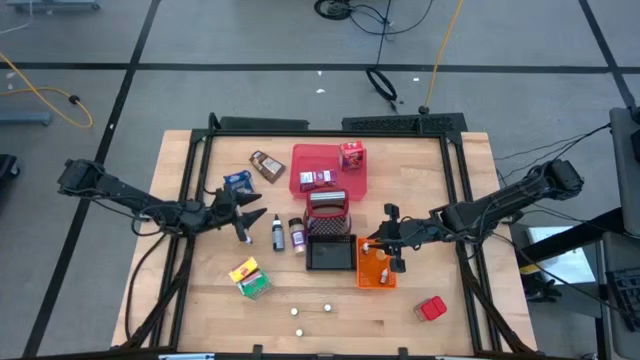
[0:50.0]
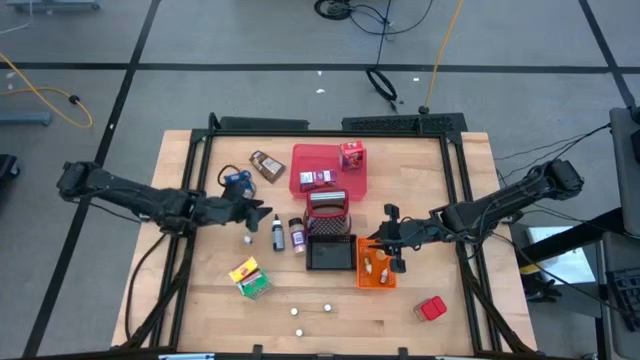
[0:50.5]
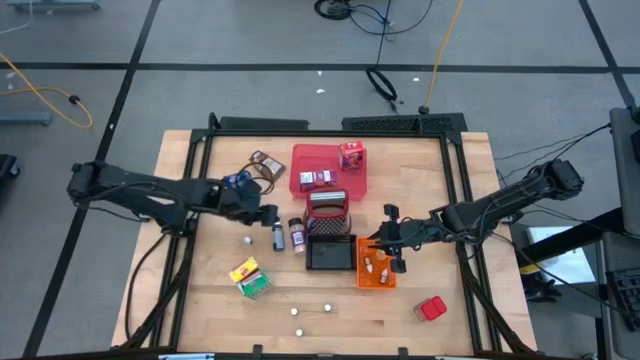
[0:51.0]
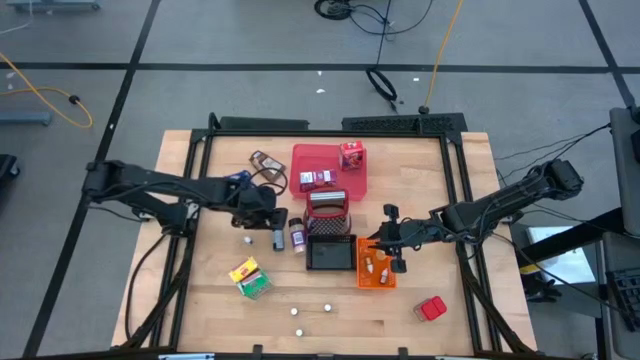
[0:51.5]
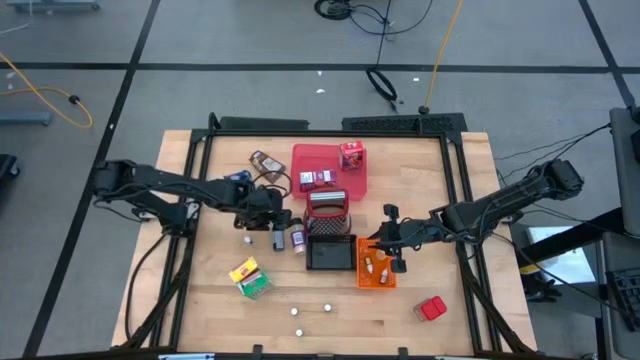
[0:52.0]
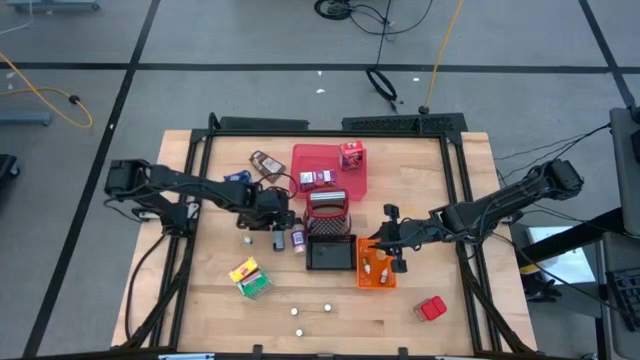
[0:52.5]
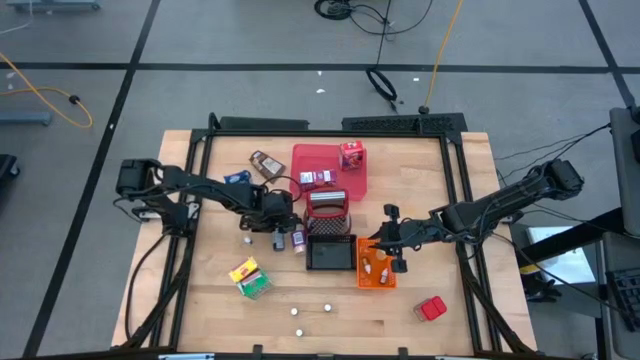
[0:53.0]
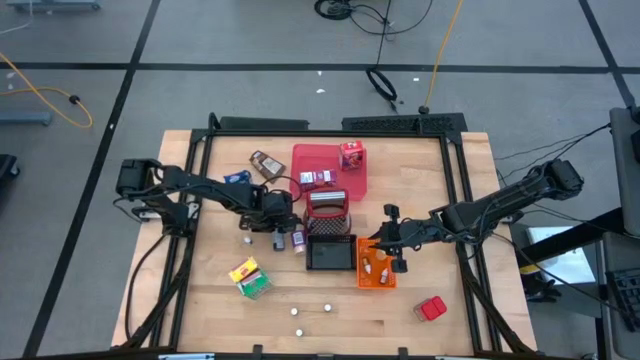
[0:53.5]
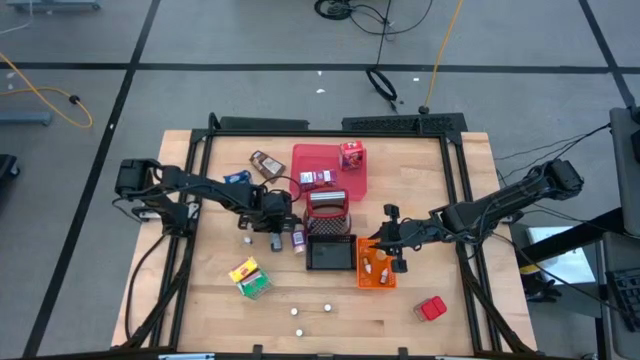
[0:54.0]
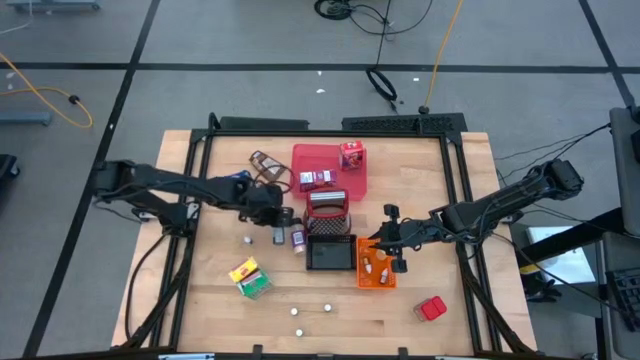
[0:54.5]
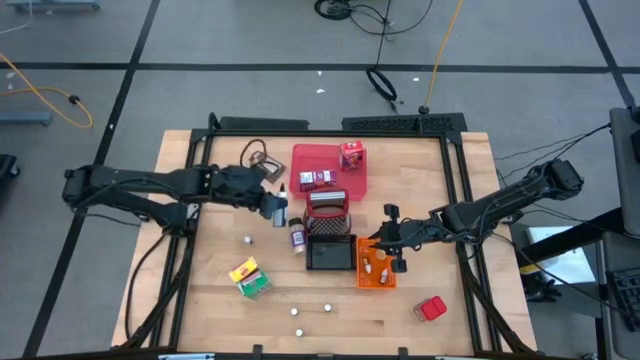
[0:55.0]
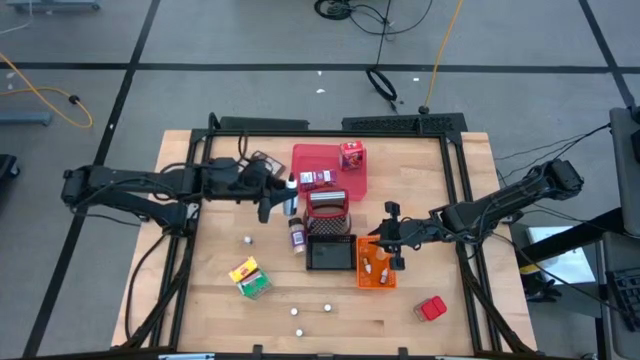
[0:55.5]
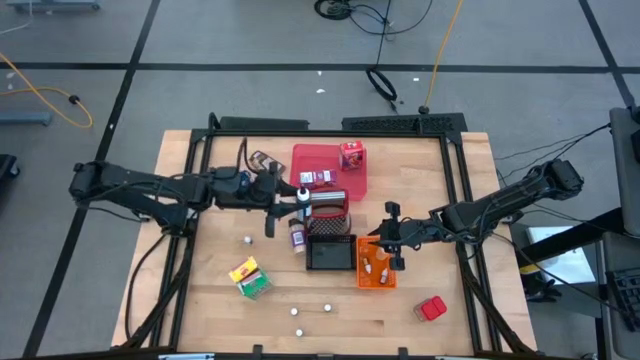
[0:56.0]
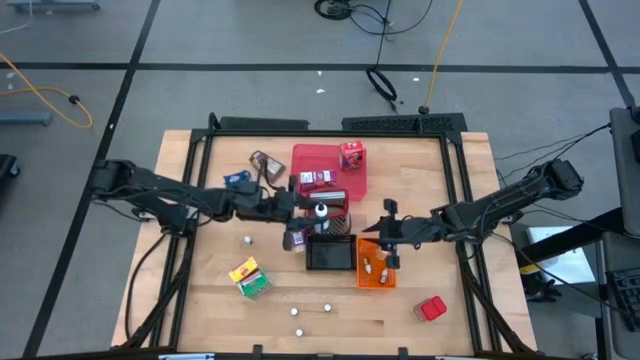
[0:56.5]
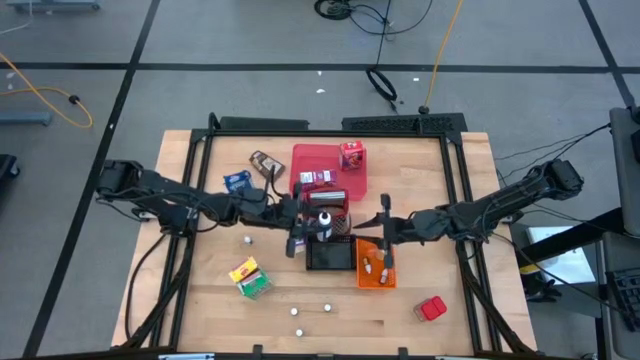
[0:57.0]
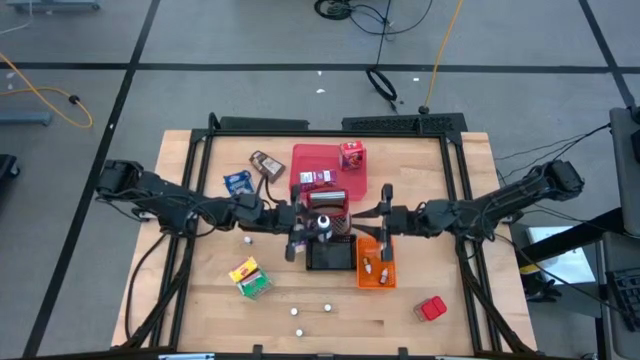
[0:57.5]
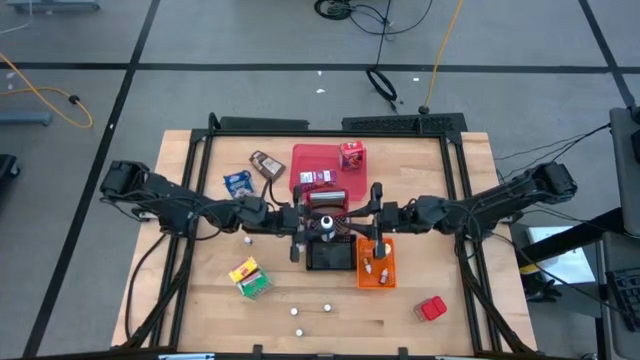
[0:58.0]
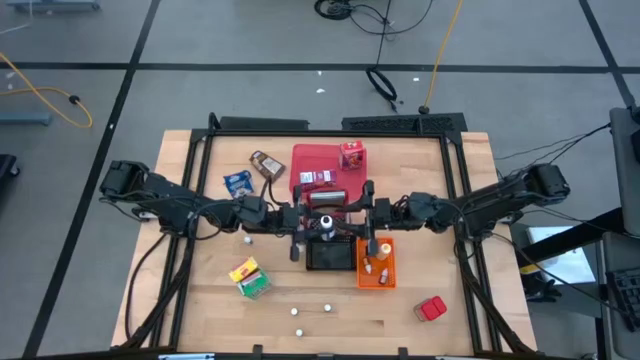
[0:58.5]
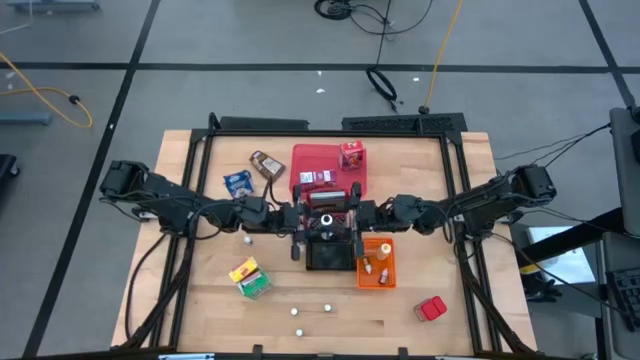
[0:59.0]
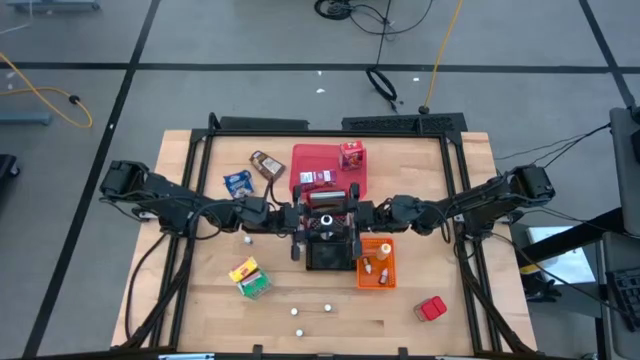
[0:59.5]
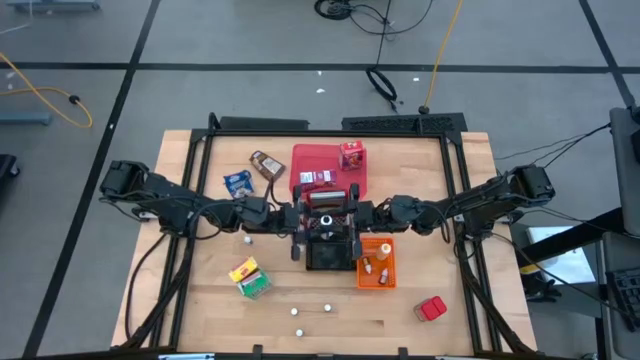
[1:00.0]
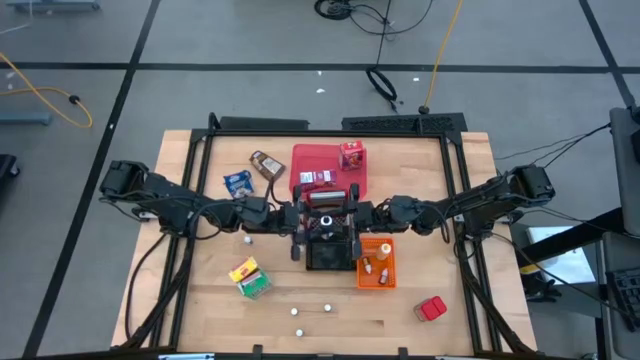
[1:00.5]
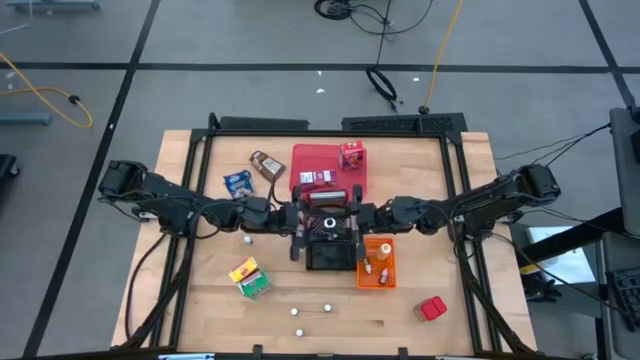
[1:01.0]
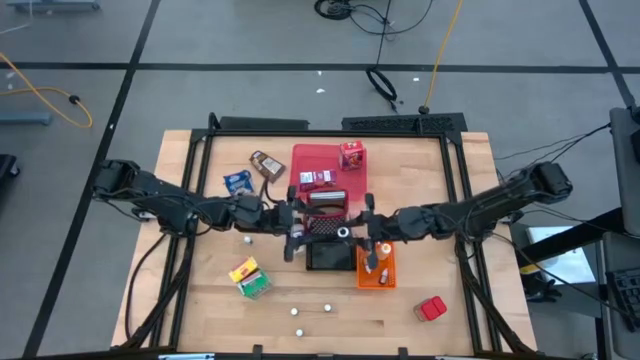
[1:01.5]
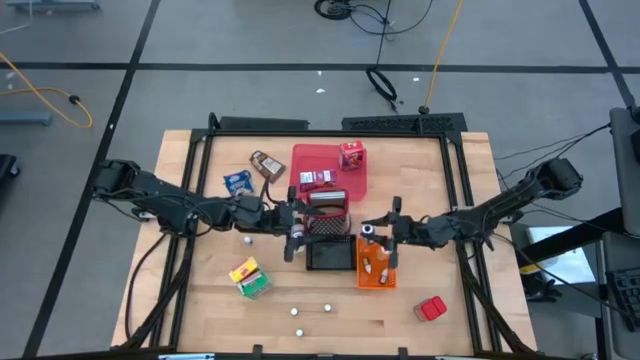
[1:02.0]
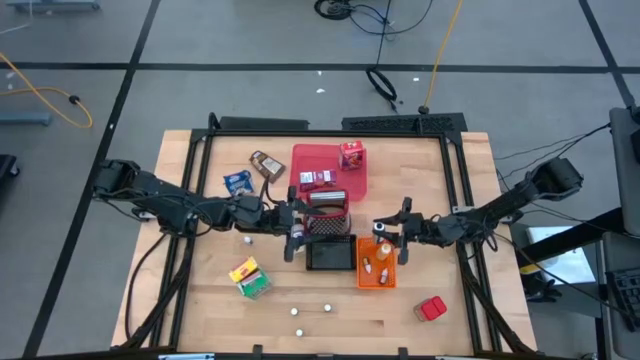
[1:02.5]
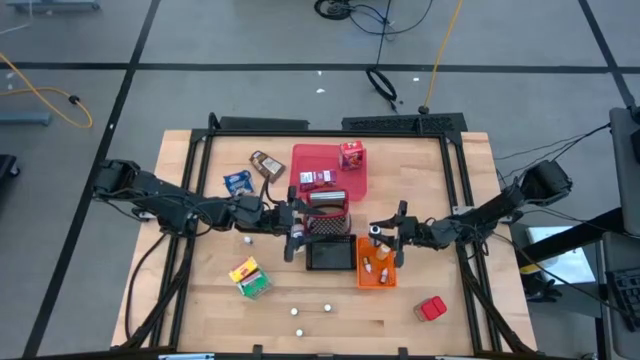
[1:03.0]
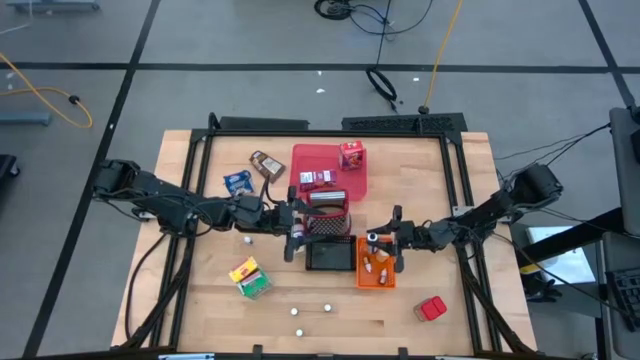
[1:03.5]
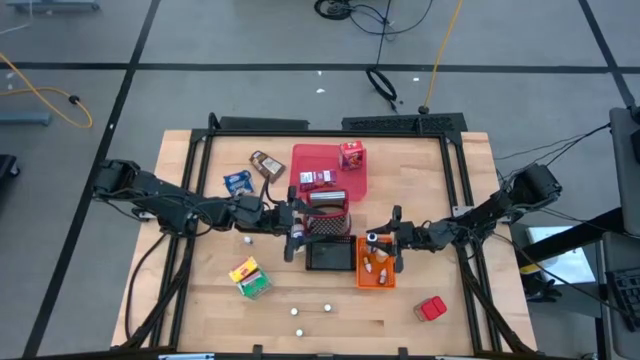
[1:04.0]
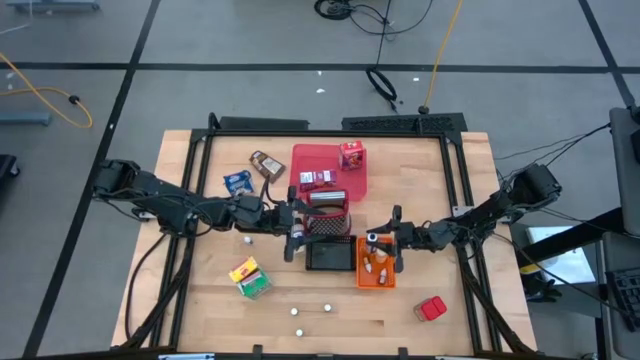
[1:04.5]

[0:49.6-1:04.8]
Task: Pick & Place Kitchen Items
Put the big black food coloring bottle into the orange bin

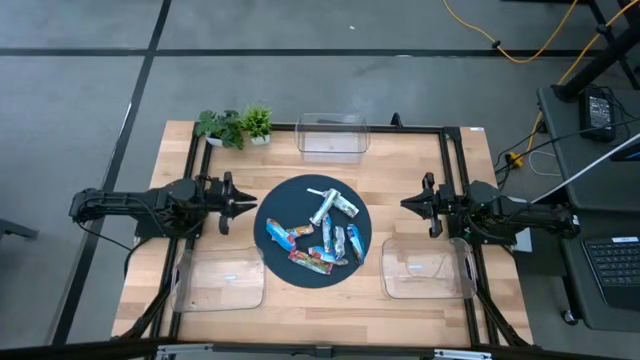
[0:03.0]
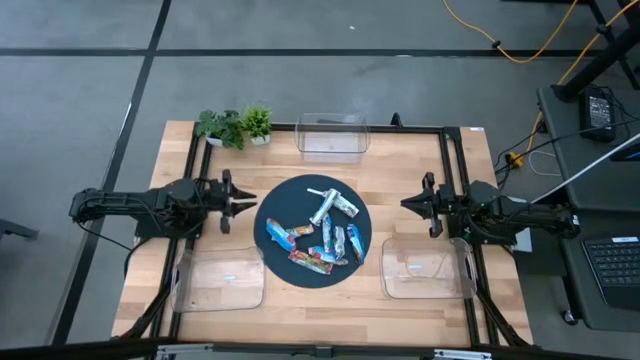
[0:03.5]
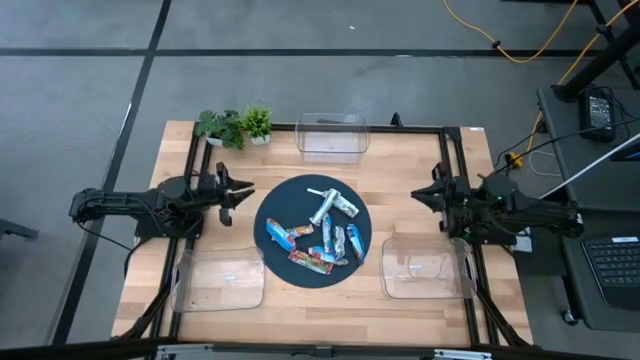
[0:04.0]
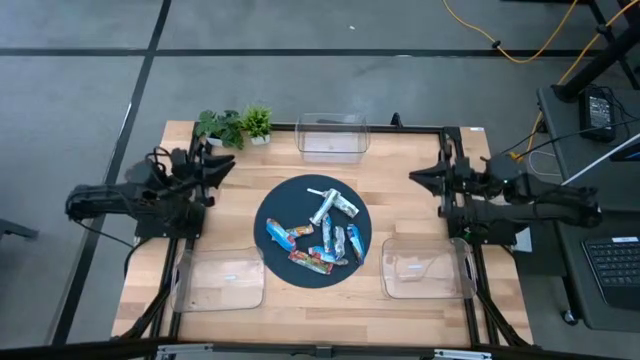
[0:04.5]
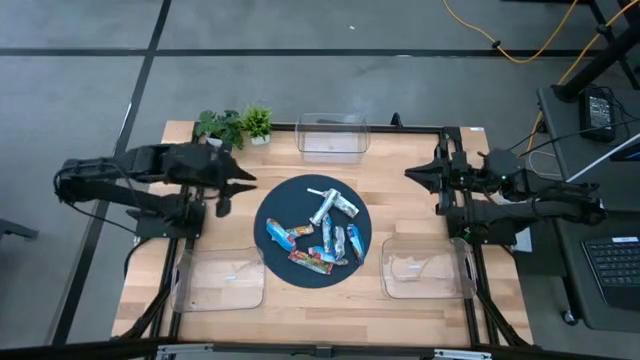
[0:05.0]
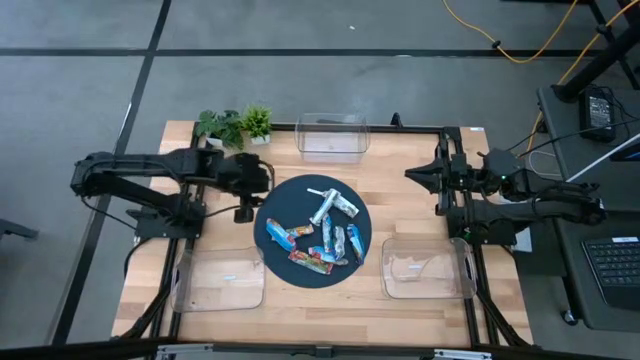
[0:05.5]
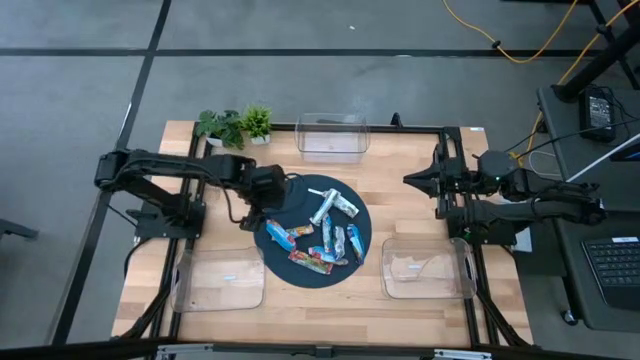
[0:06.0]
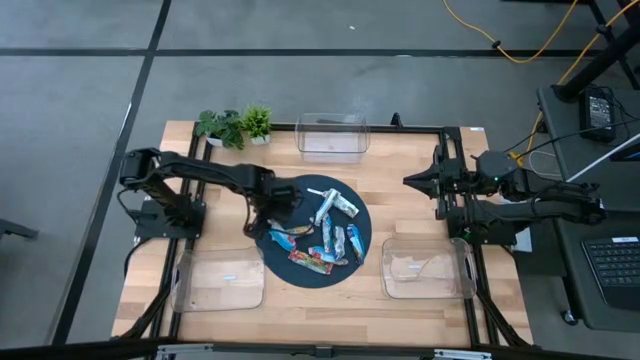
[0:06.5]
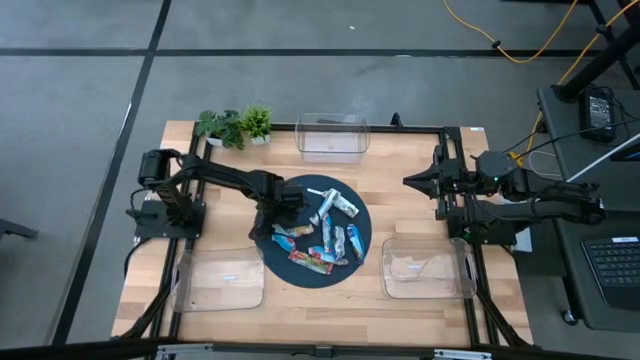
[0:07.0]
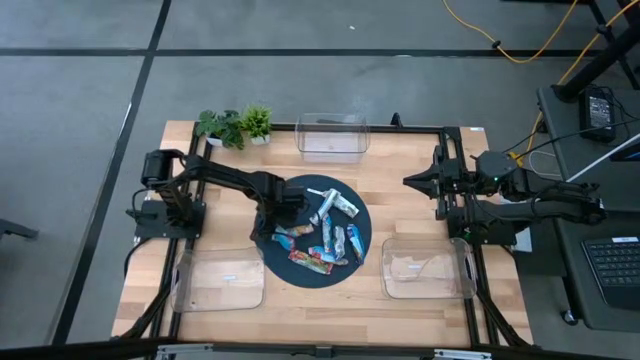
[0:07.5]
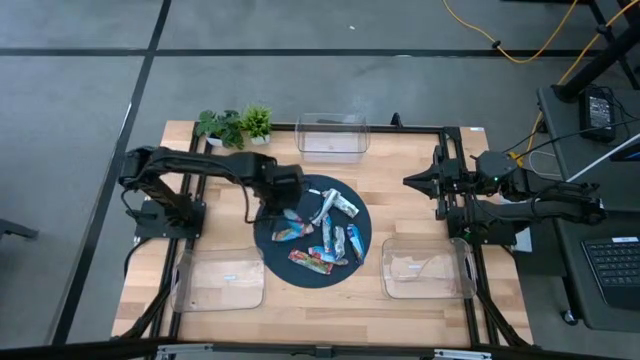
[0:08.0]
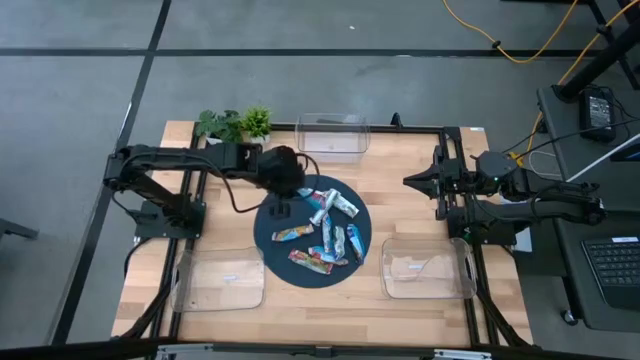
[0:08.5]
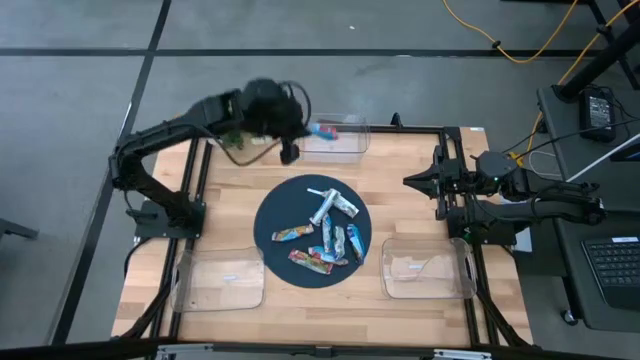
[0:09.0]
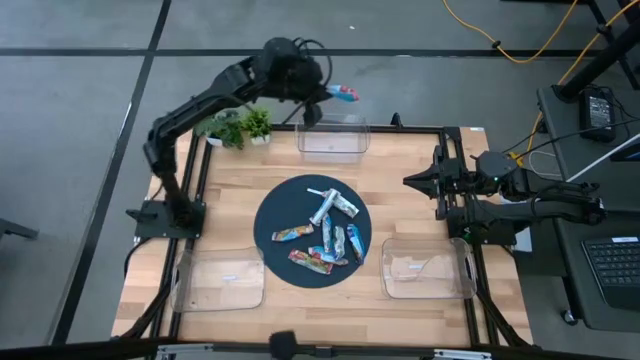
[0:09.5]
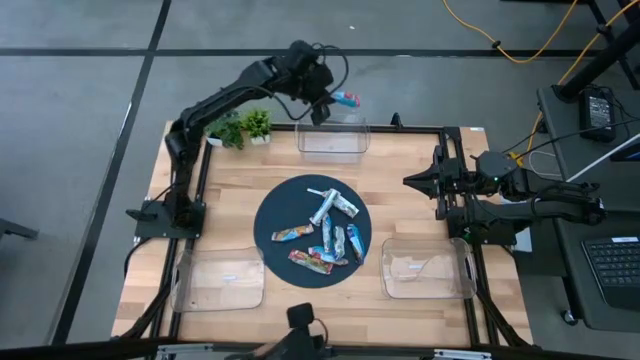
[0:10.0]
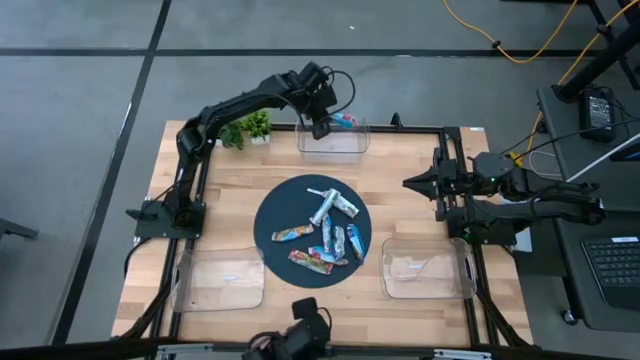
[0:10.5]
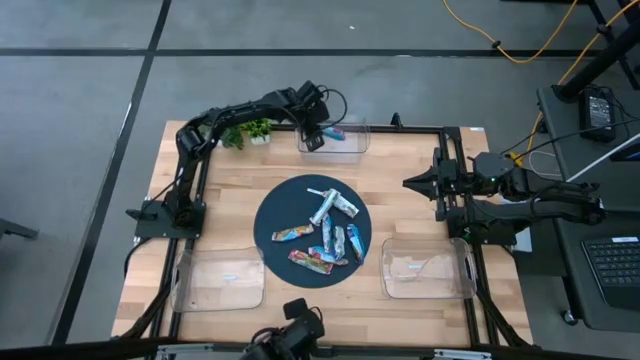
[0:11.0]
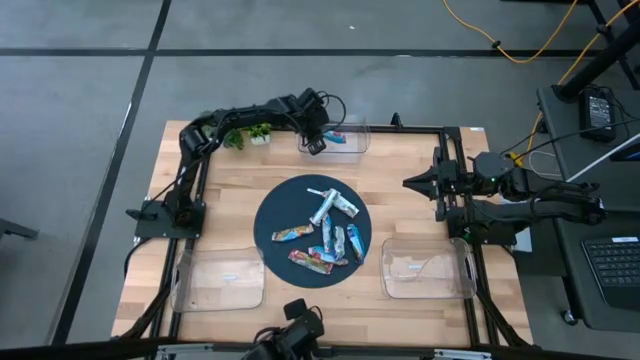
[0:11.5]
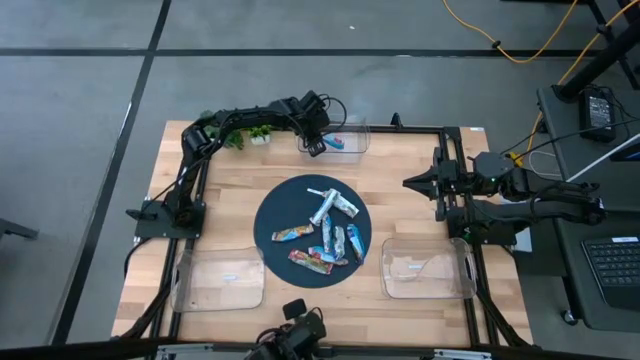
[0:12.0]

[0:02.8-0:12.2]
Task: Pick and place Granola Bars by type
Put the red granola bar into the top transparent bin
